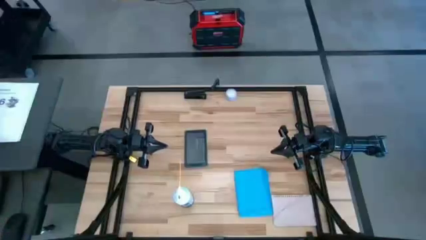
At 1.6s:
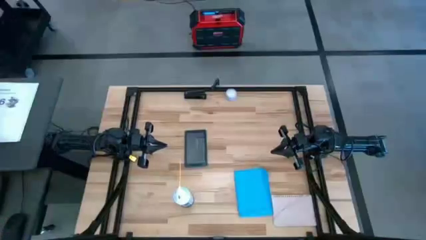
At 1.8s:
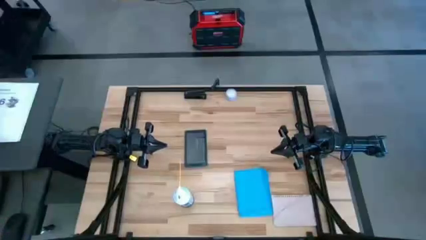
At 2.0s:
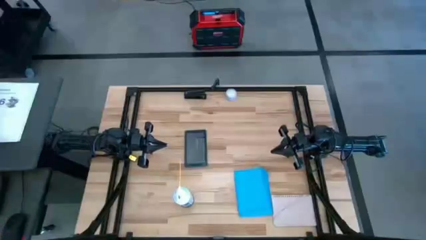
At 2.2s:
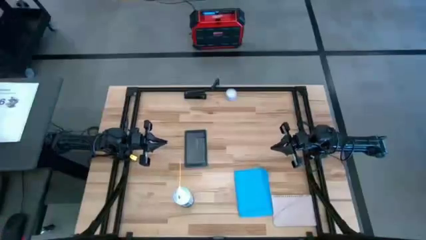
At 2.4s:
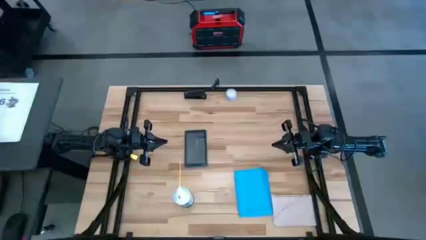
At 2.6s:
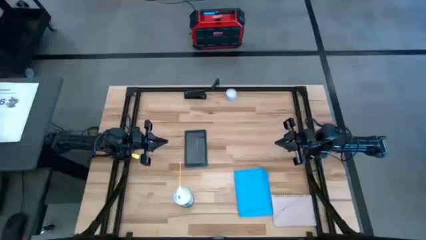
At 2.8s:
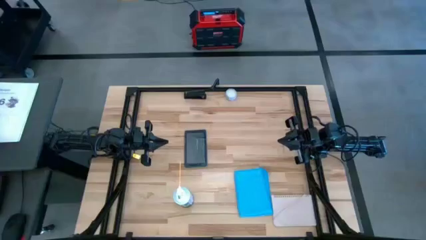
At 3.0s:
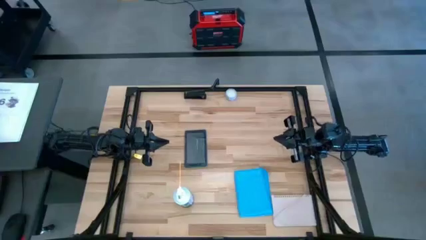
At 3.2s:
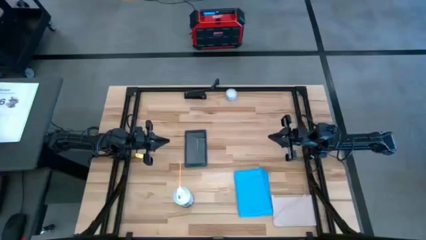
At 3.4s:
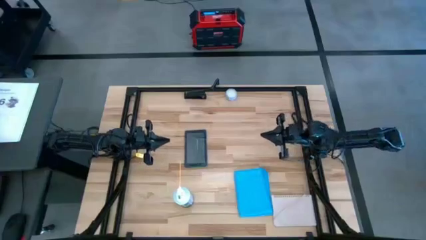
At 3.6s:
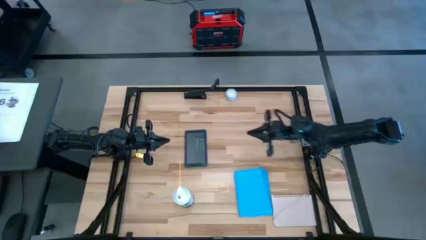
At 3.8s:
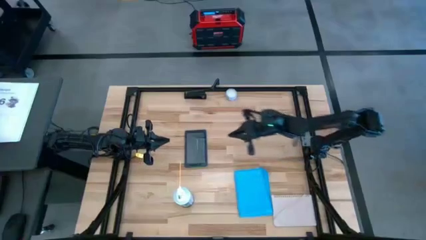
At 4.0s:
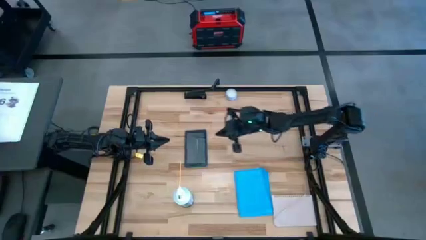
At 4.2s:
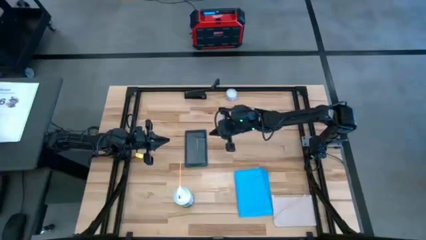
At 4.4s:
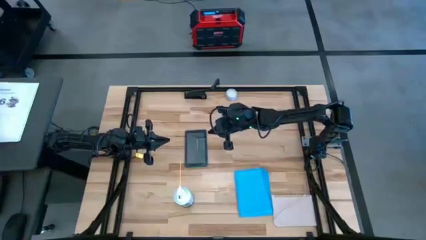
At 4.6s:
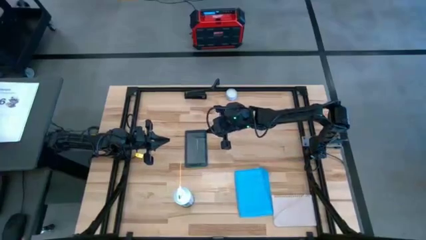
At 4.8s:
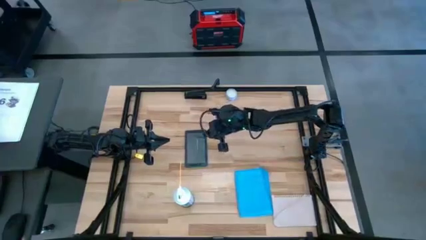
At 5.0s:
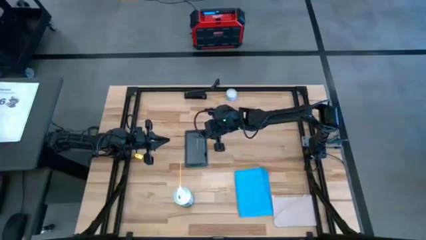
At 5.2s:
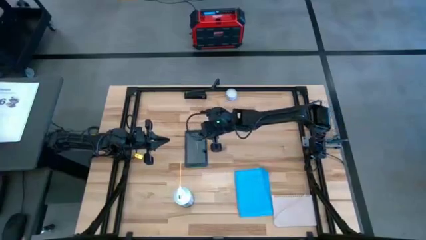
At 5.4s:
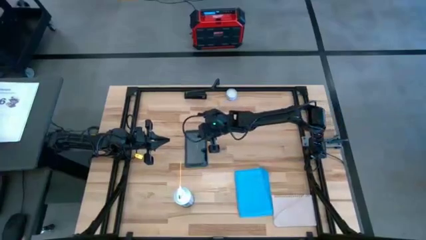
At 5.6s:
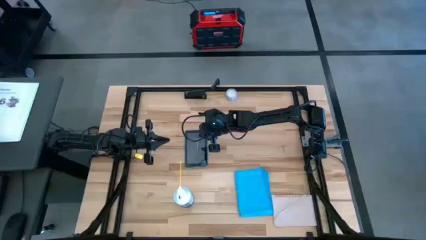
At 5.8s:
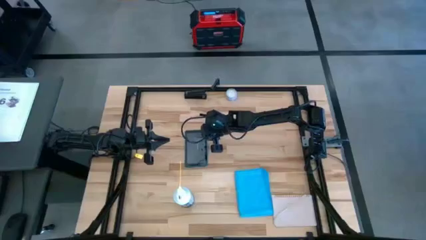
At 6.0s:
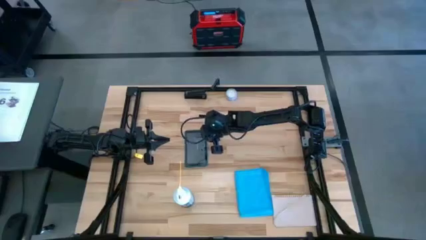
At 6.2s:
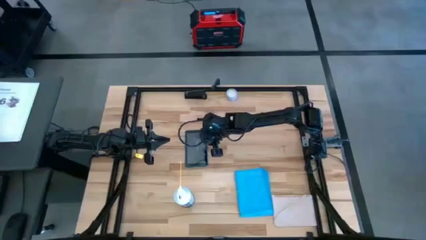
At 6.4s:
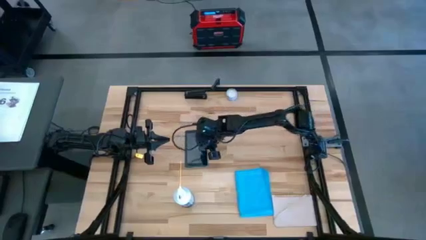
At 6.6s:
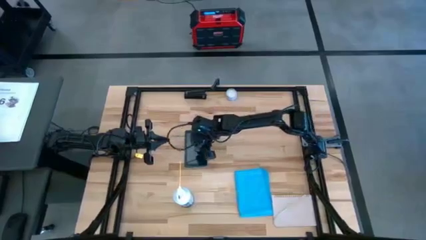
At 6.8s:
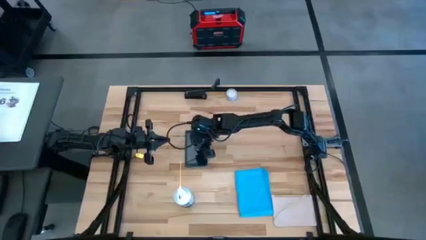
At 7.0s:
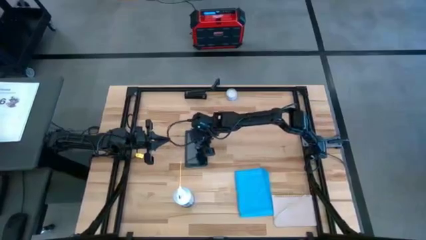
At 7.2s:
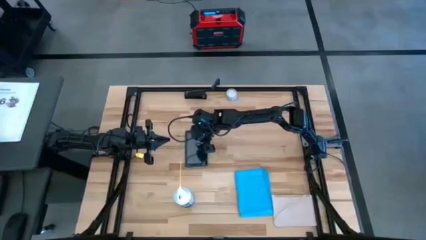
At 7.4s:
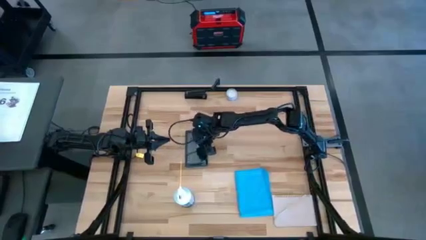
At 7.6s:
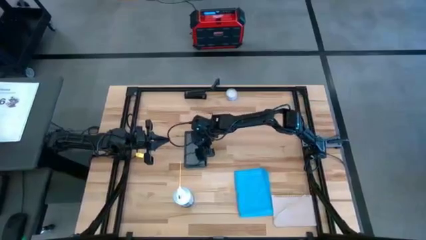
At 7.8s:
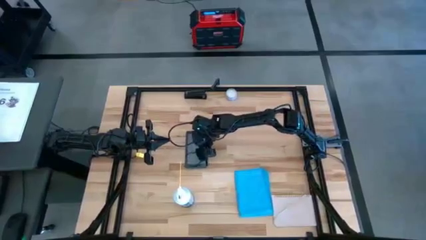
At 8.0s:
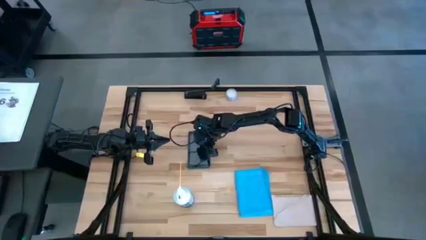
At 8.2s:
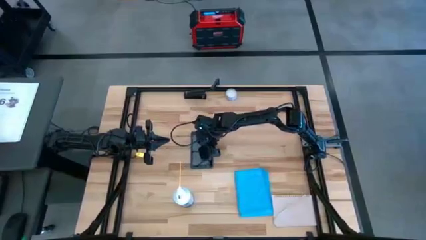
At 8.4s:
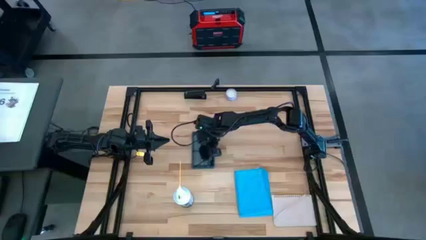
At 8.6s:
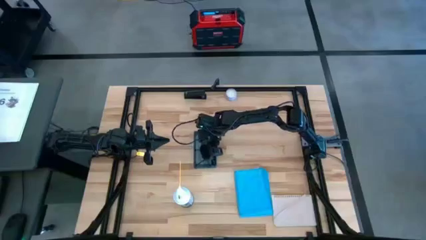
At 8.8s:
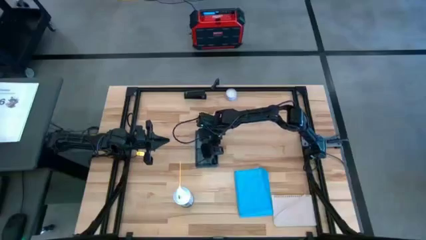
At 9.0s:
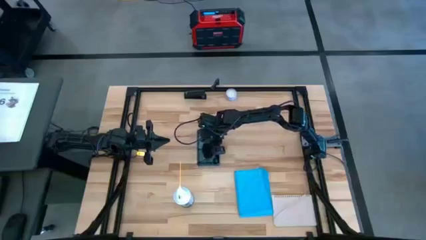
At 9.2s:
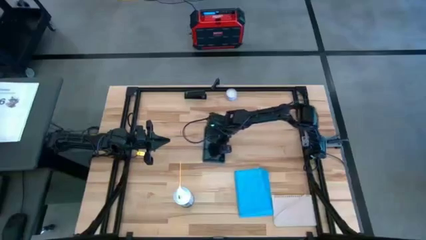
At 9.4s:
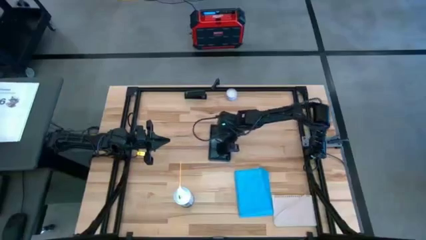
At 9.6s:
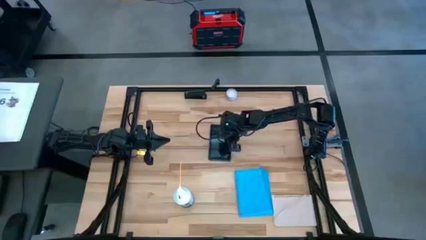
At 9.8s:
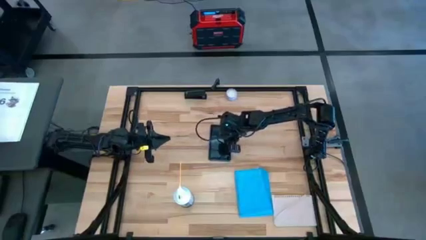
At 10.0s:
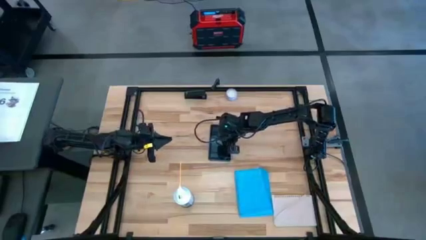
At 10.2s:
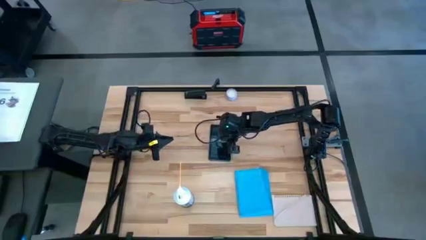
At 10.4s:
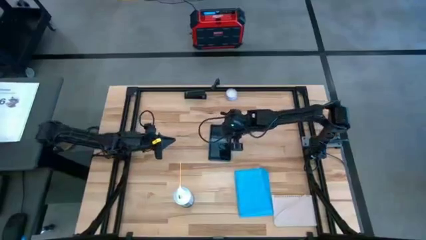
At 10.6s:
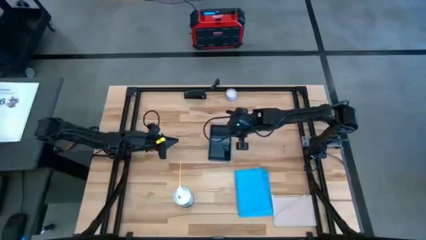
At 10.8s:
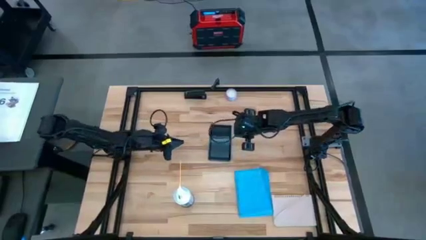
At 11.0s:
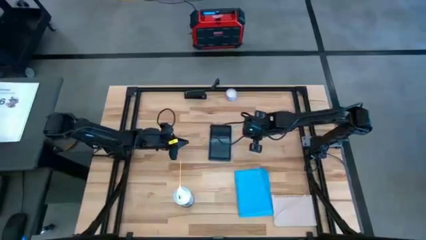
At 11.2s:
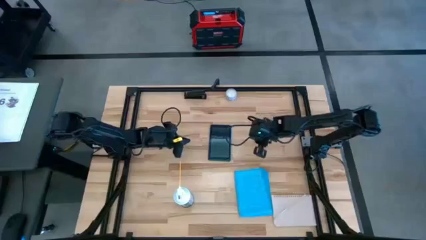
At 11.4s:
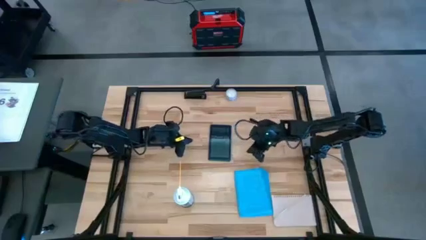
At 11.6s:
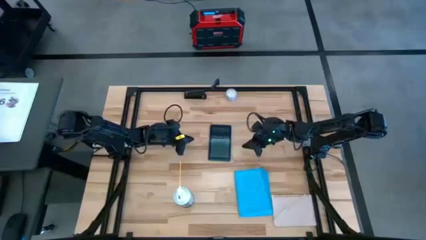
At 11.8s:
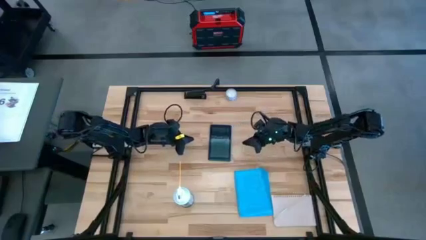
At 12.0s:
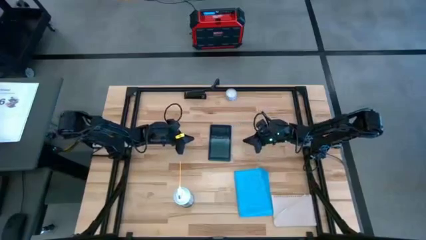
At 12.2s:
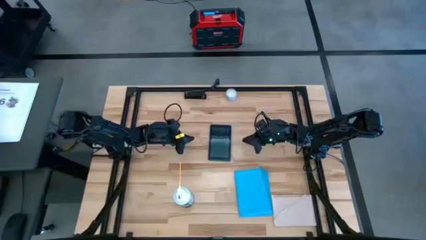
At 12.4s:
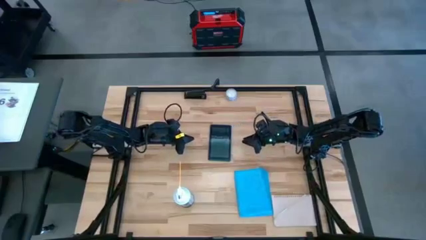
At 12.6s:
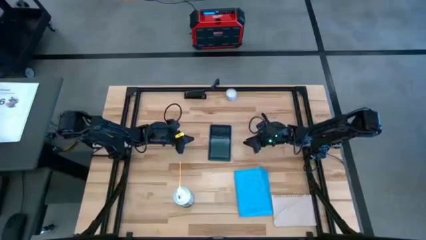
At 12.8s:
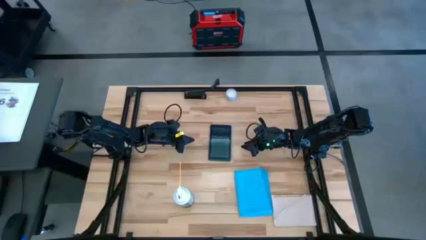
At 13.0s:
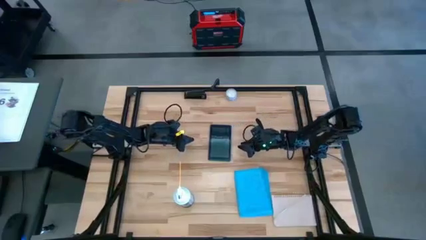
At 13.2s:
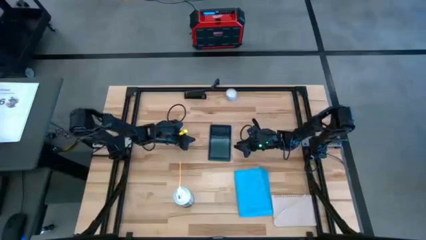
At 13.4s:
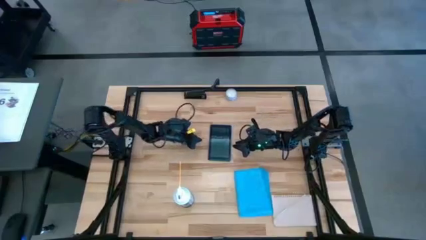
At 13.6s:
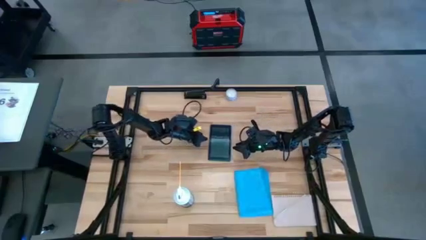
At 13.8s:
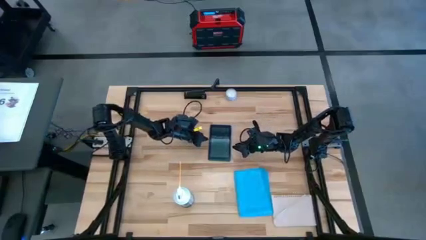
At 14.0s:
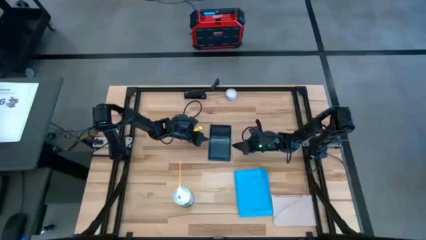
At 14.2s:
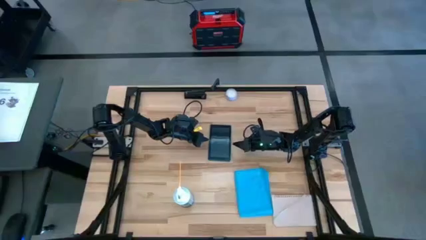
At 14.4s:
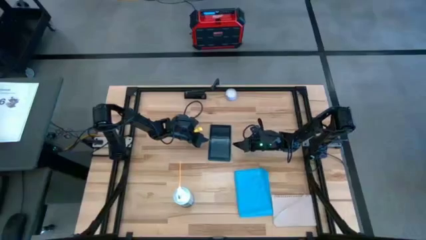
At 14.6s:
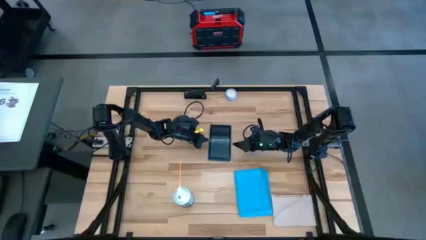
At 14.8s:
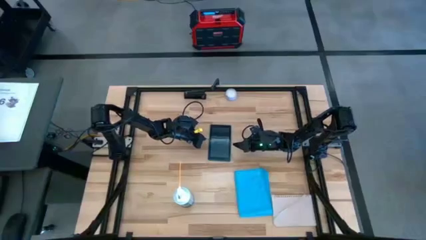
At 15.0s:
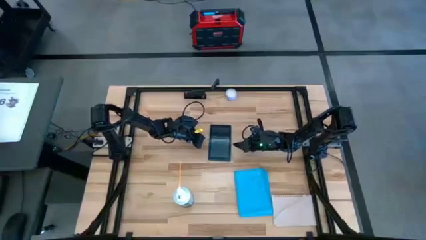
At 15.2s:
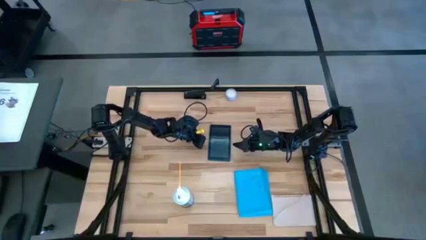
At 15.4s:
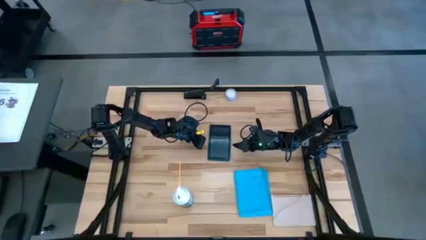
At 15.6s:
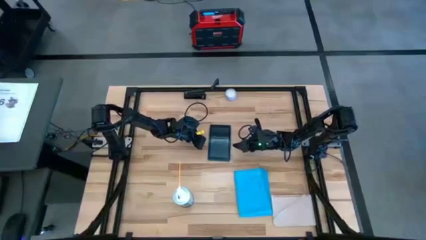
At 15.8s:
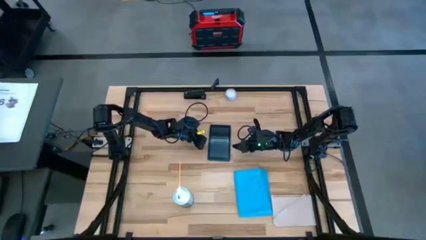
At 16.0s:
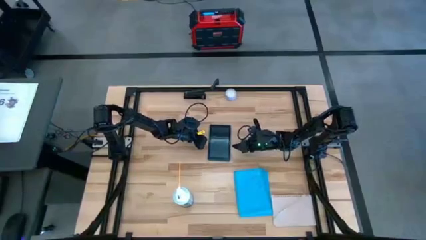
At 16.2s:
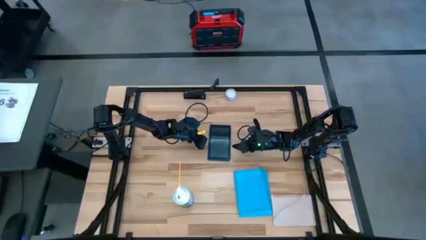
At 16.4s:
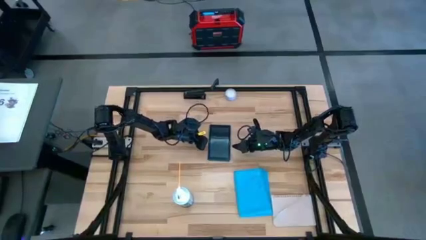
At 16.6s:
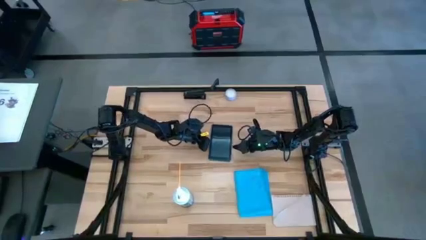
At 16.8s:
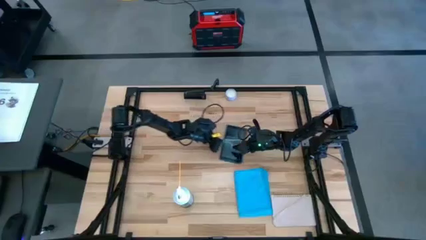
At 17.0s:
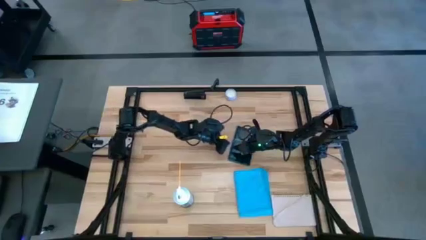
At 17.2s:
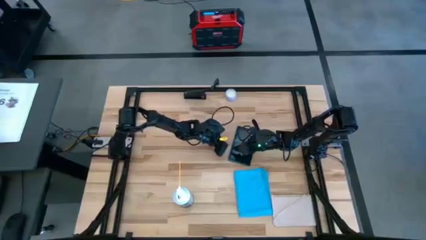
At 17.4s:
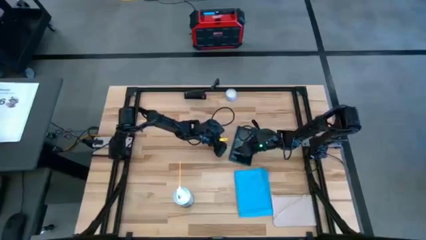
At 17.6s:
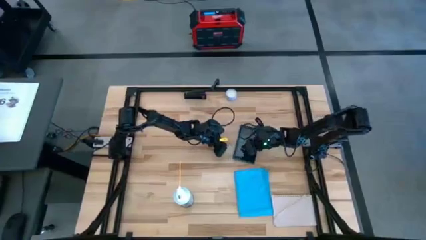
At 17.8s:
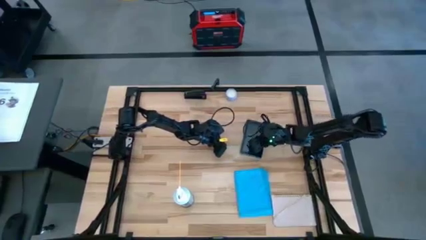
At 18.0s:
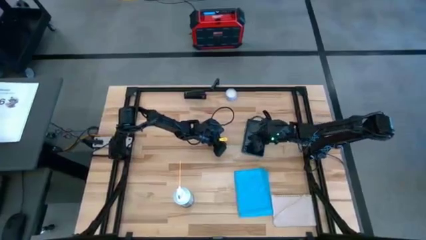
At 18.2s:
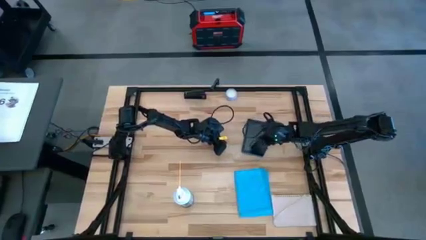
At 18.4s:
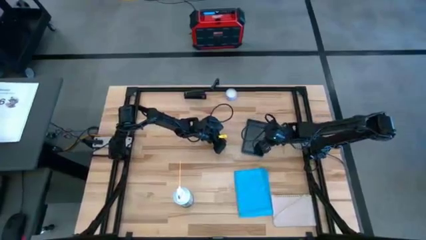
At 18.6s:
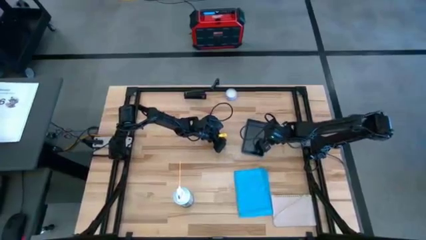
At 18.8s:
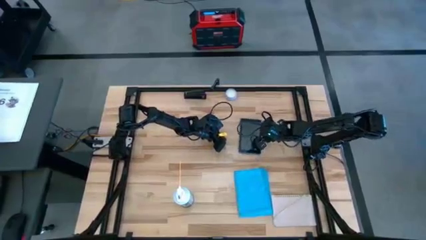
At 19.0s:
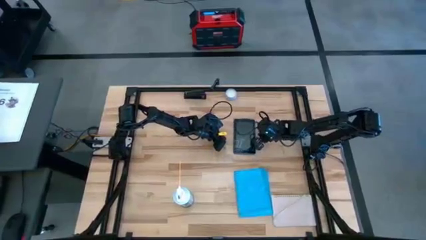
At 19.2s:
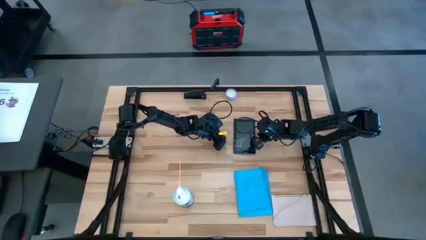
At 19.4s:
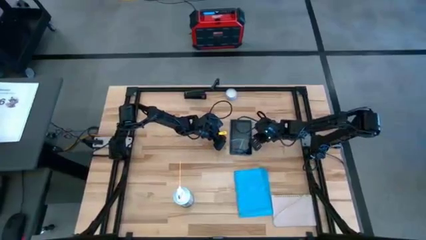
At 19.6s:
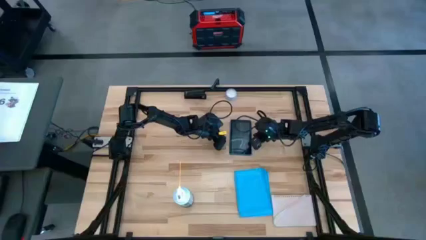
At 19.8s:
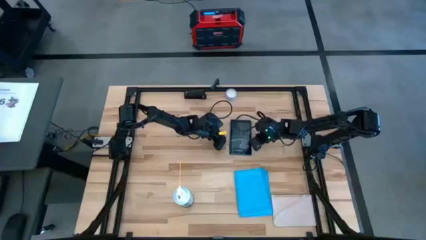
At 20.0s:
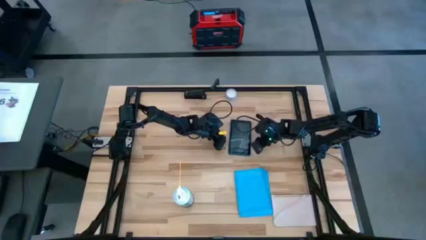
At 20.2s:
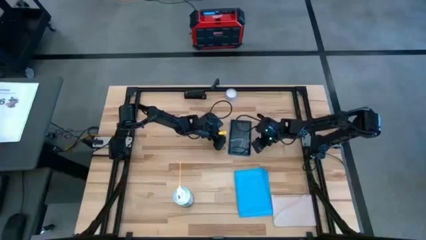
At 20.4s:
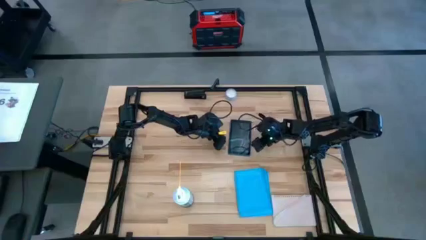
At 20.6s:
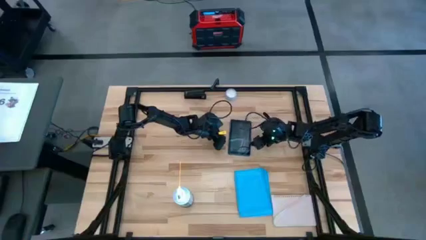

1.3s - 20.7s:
Task: Apply microfiber cloth
Spray the front of the black tablet using the spray can
